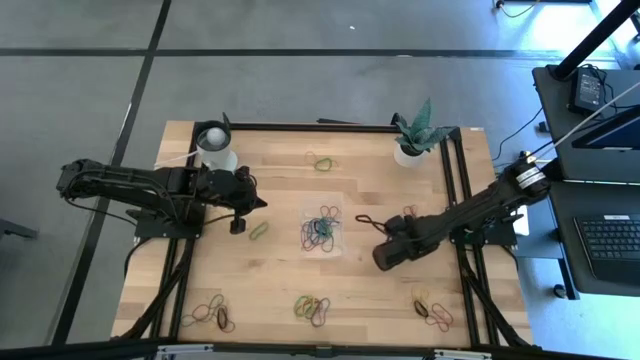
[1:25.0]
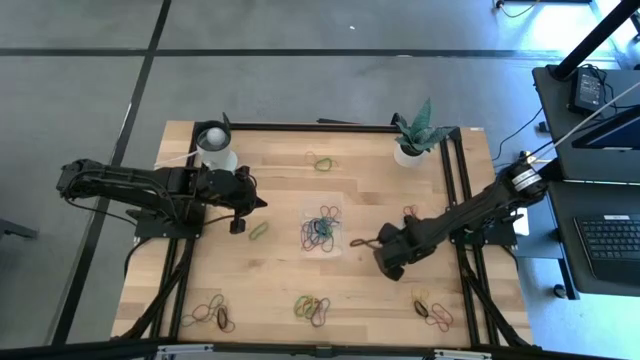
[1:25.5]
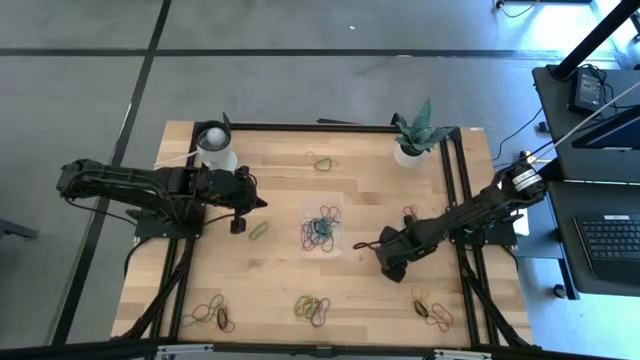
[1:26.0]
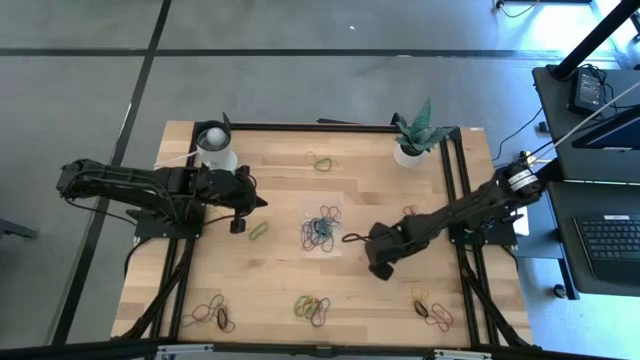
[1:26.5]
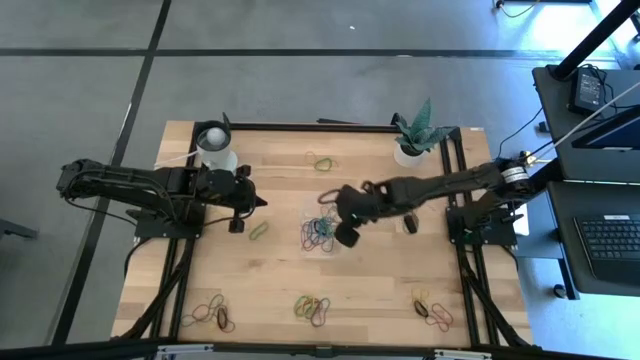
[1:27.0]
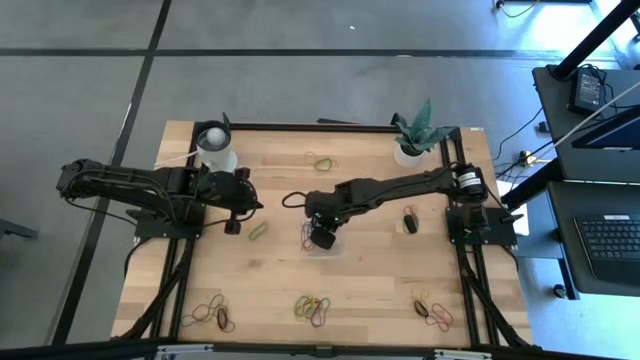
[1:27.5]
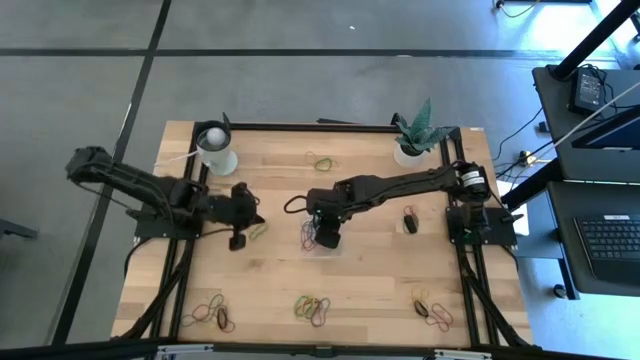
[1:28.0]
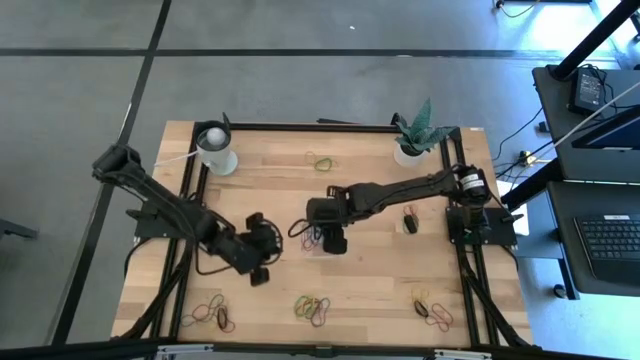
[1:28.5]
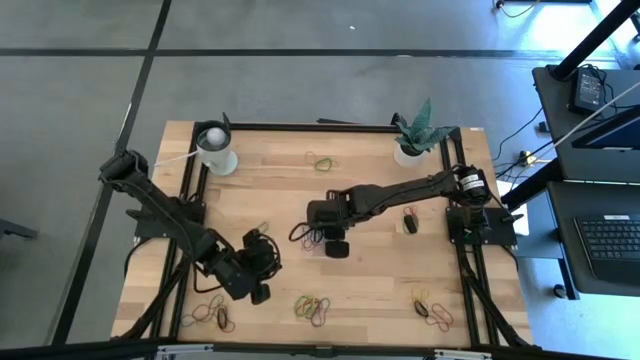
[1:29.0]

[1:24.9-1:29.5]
Task: Pick and place rubber bands into bin
Put the green rubber band into the transparent bin

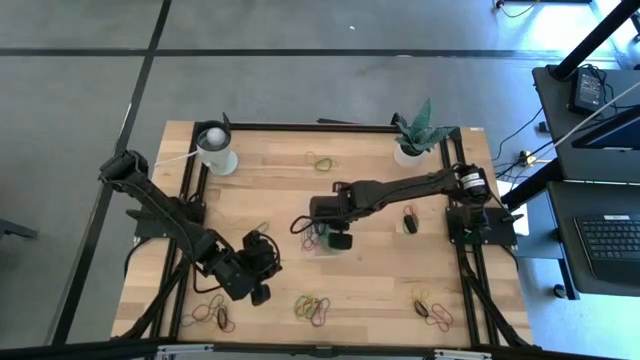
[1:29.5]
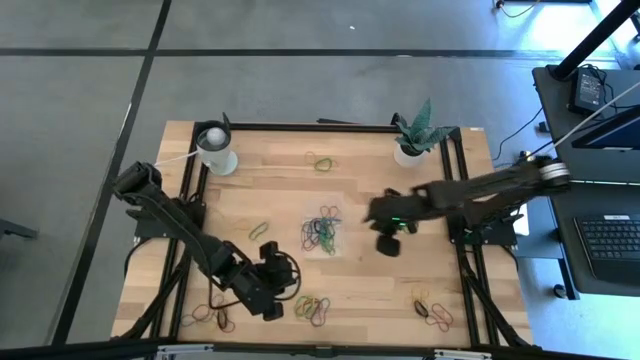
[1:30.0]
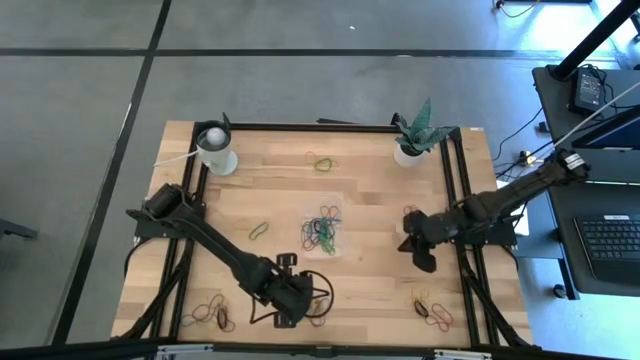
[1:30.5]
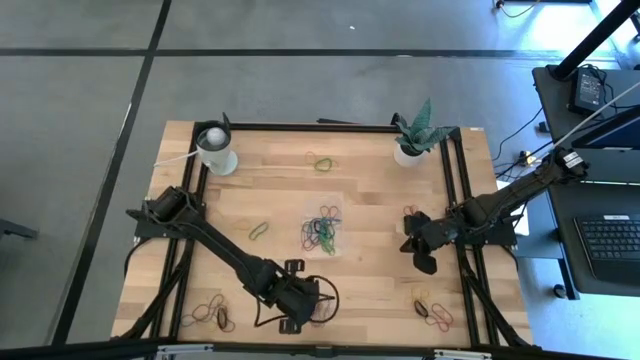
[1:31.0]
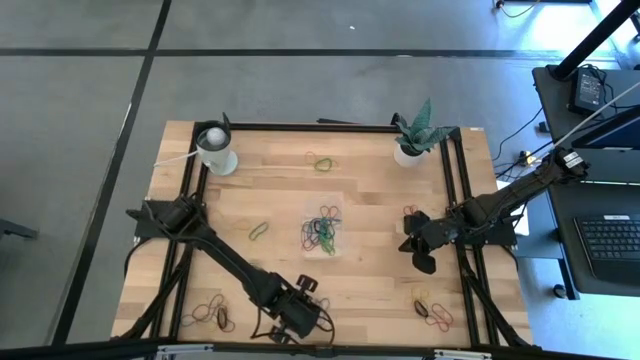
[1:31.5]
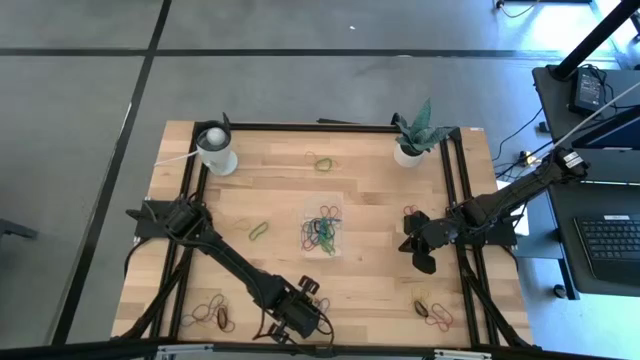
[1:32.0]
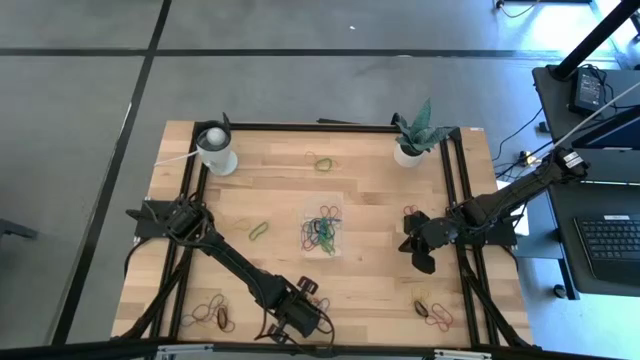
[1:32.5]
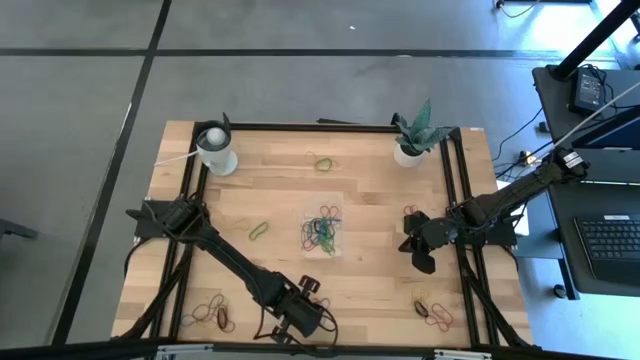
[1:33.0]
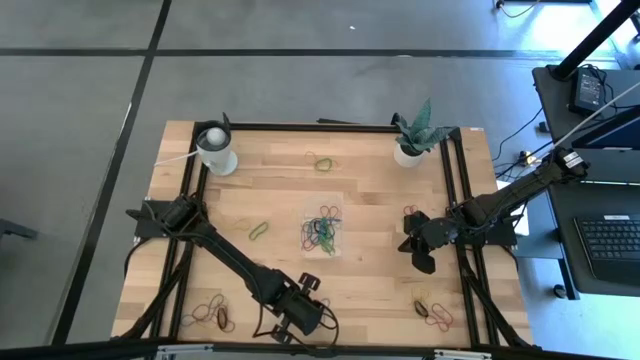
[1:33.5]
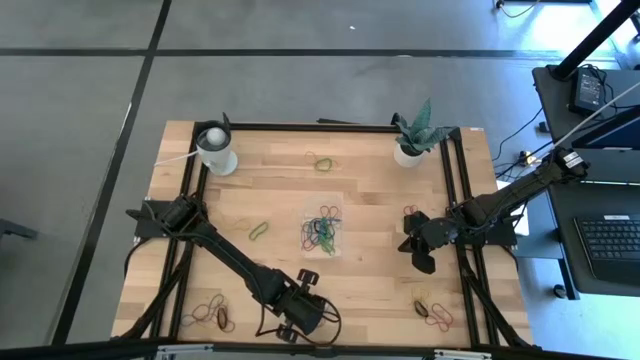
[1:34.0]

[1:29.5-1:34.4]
Put the yellow rubber band into the transparent bin

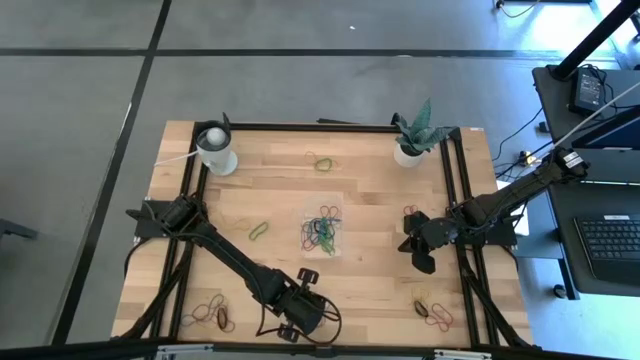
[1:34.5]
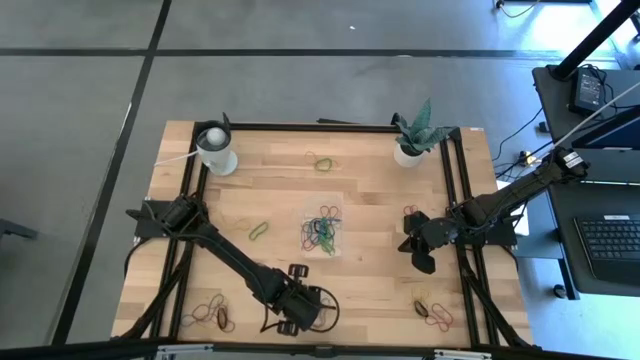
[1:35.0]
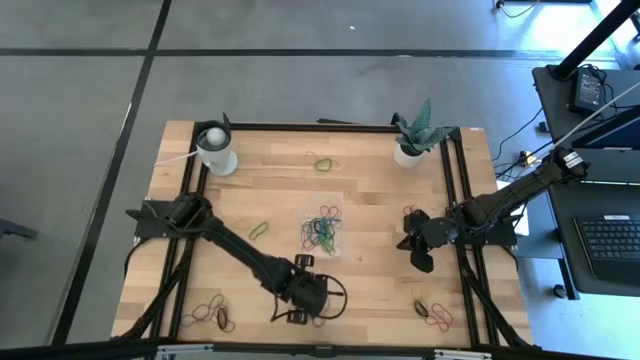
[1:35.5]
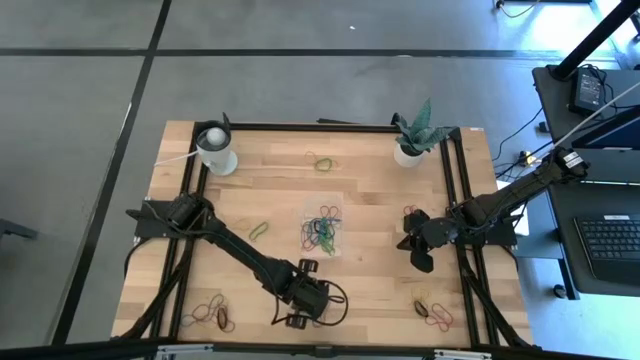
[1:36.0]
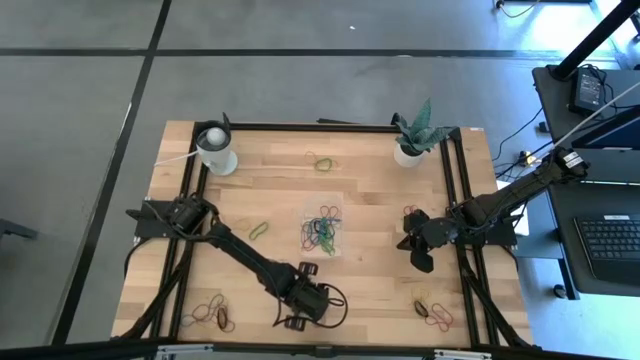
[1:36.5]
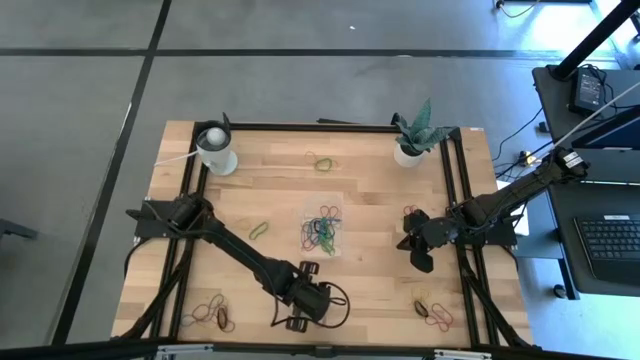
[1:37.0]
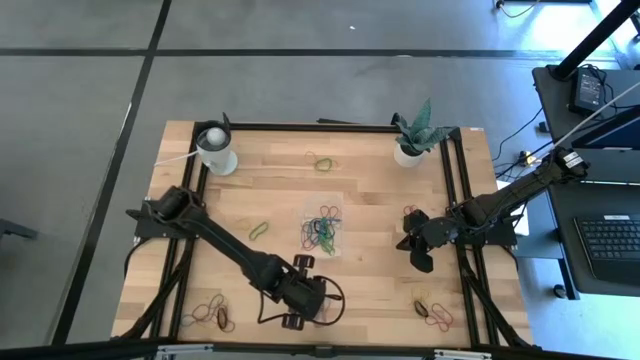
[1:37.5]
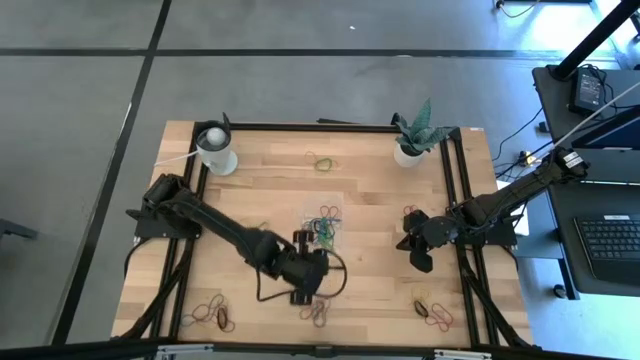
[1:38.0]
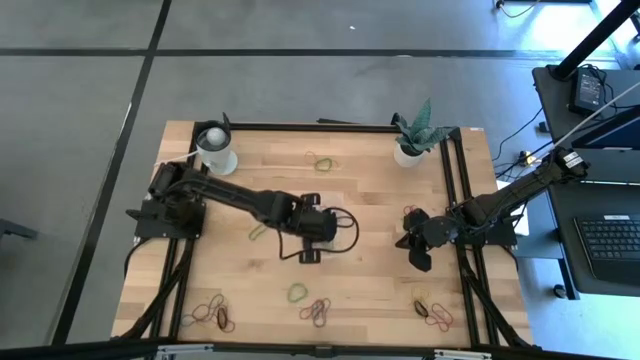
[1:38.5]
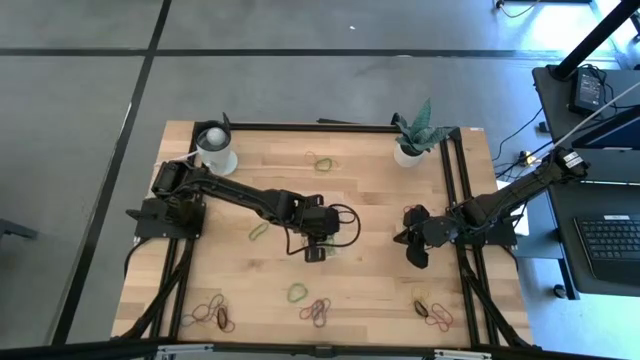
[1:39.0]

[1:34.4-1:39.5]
Put the yellow rubber band into the transparent bin

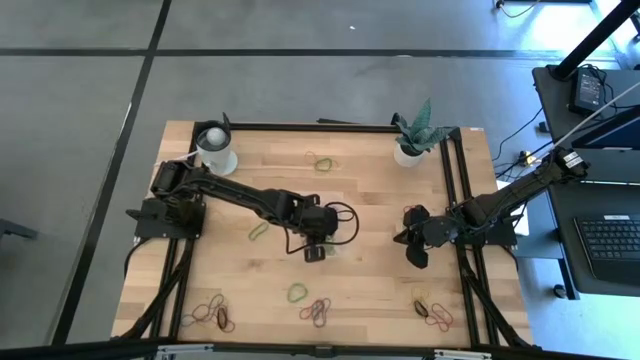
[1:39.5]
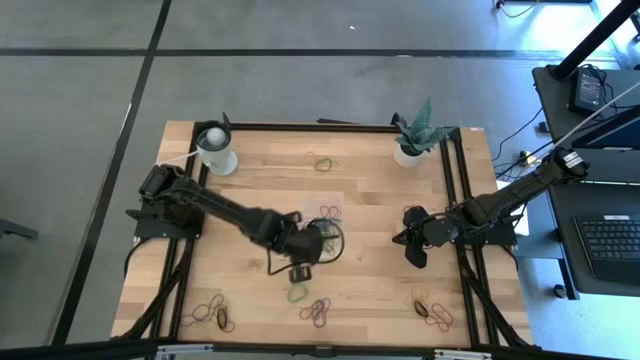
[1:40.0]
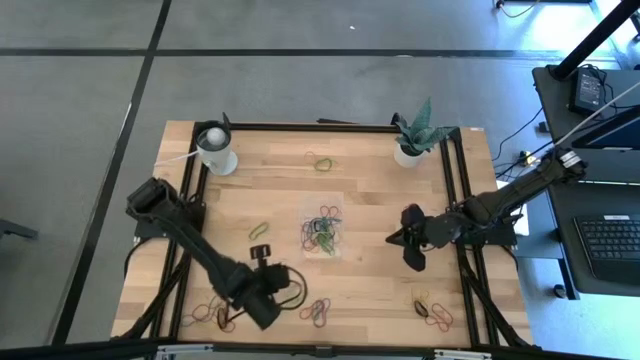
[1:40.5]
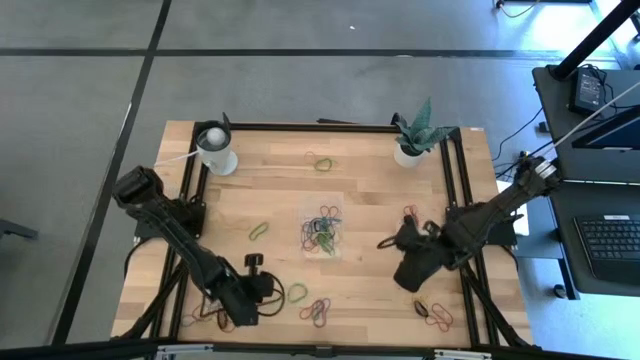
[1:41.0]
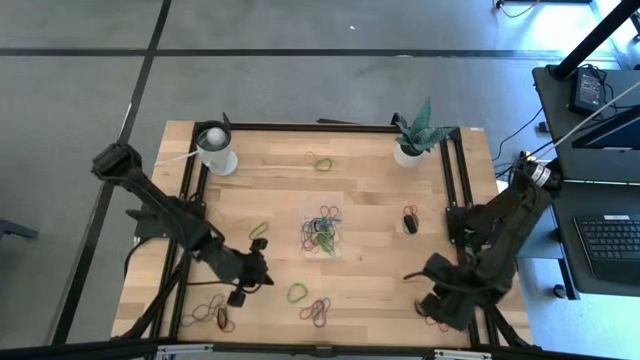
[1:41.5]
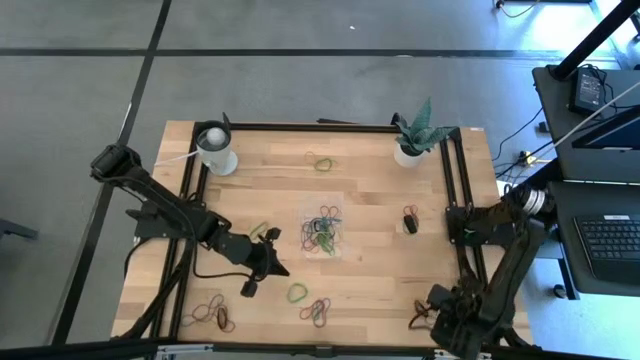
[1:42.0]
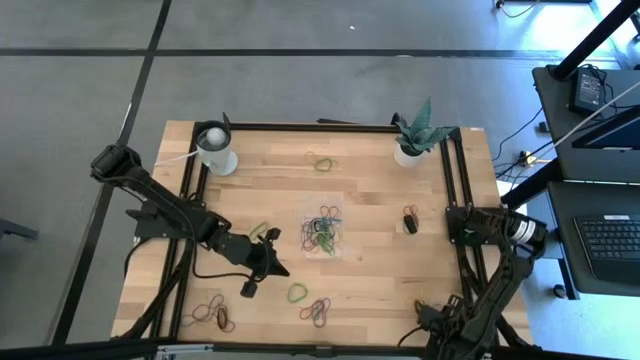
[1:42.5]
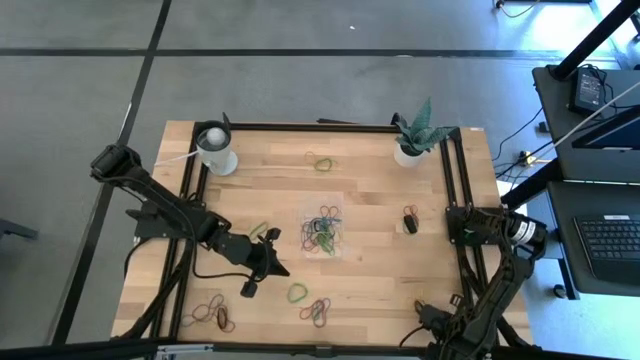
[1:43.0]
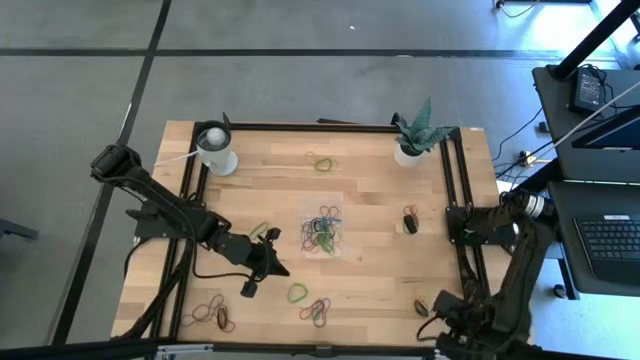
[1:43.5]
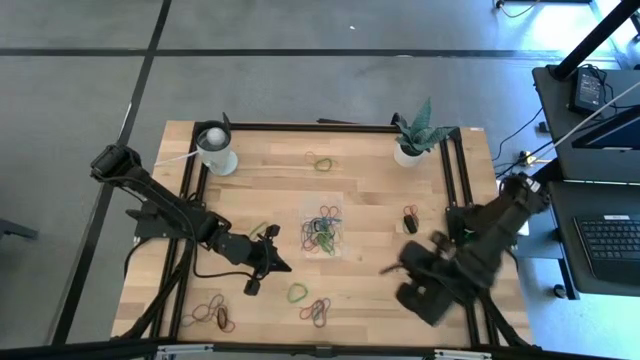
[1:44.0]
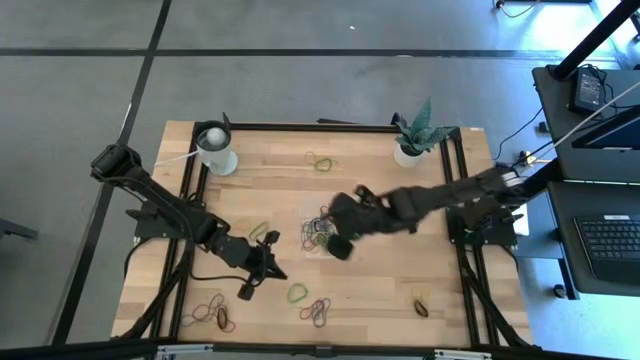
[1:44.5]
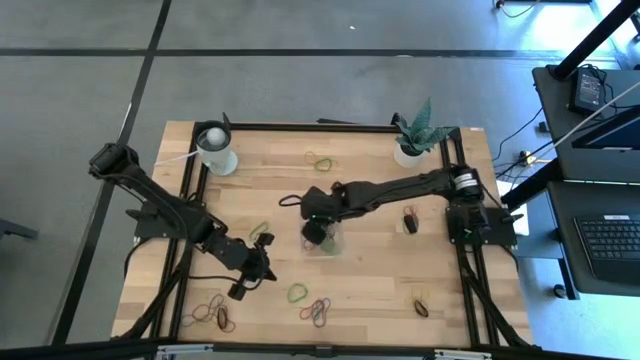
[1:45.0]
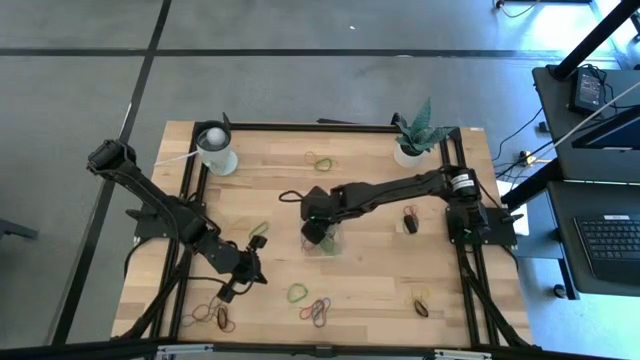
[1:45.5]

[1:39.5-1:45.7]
Put the red rubber band into the transparent bin

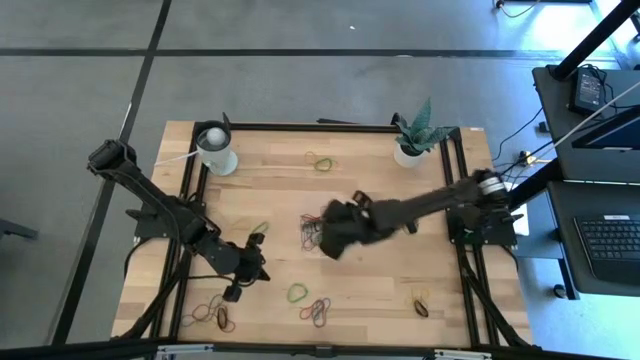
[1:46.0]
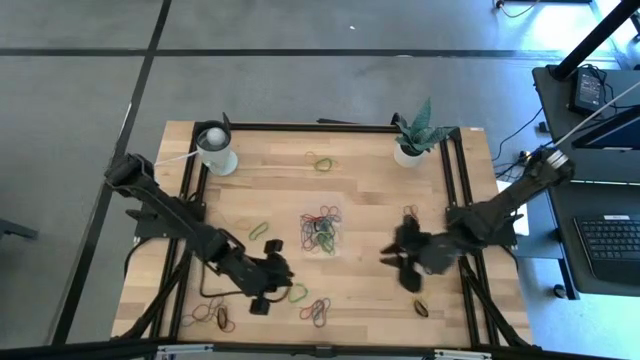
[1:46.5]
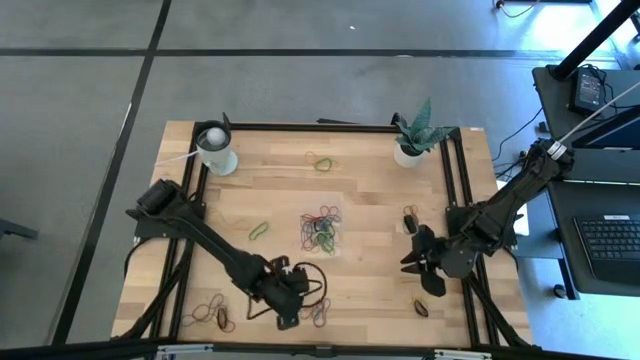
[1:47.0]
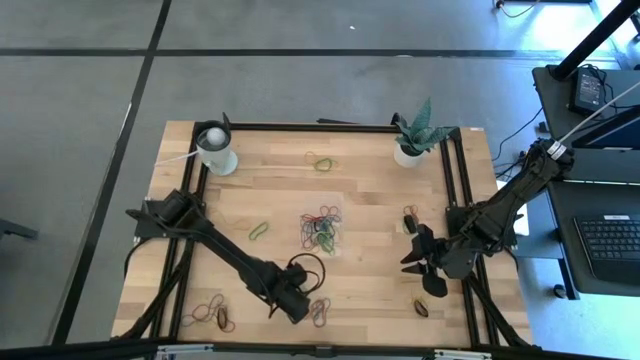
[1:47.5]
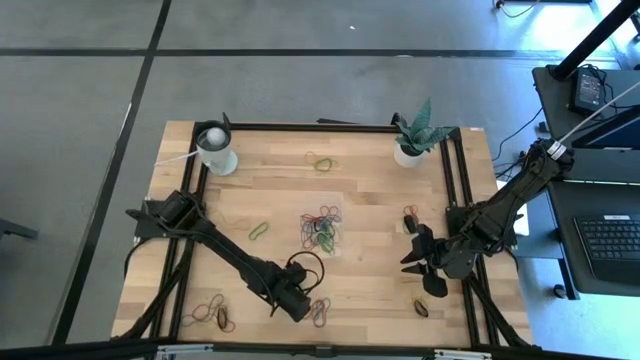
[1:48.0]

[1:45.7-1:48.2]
Put the green rubber band into the transparent bin
